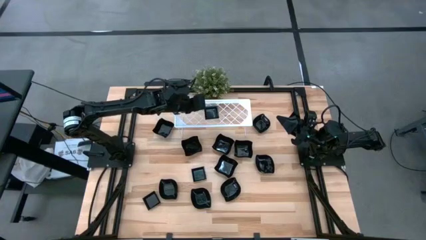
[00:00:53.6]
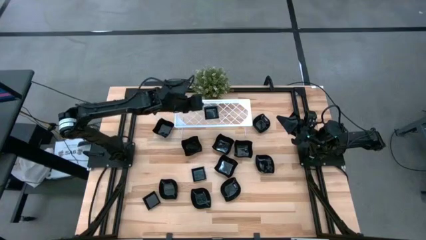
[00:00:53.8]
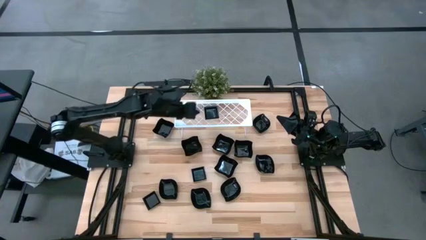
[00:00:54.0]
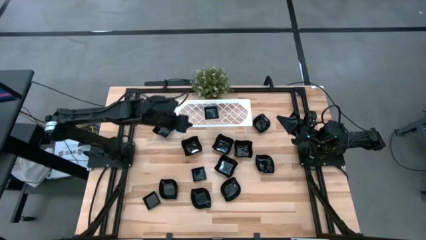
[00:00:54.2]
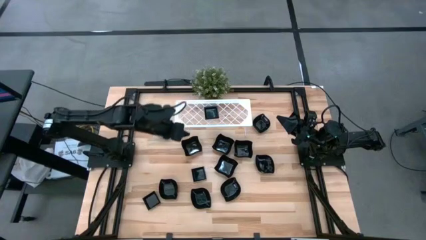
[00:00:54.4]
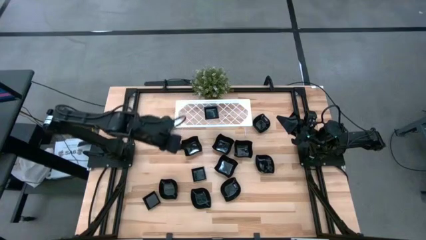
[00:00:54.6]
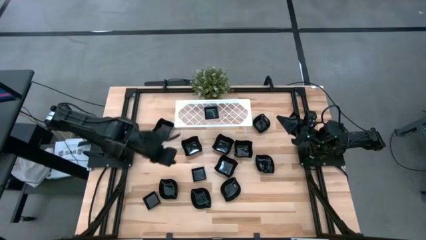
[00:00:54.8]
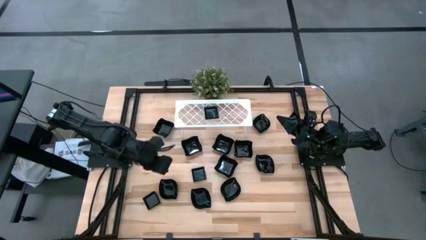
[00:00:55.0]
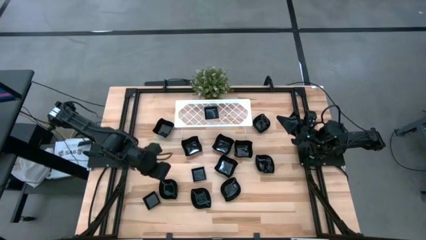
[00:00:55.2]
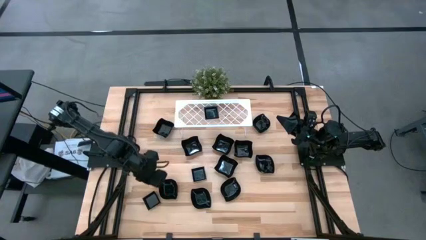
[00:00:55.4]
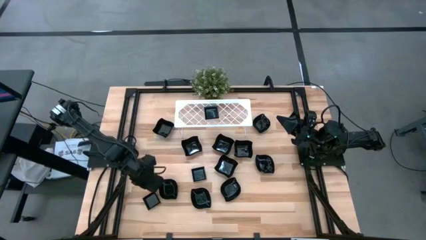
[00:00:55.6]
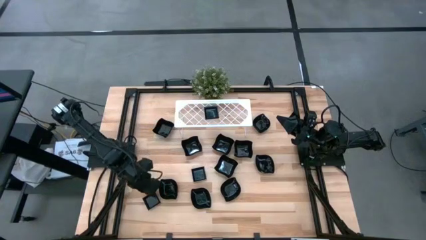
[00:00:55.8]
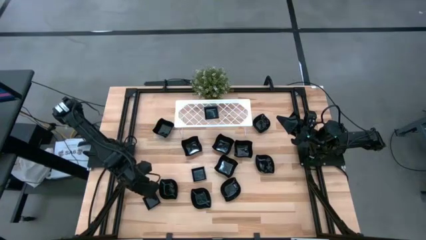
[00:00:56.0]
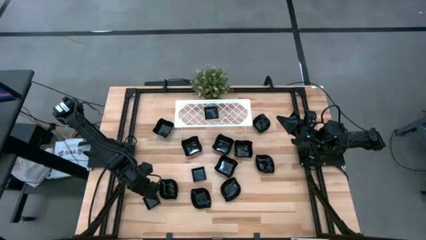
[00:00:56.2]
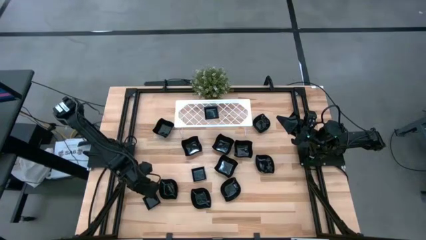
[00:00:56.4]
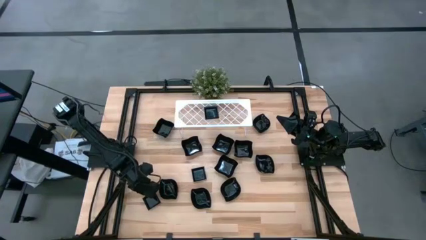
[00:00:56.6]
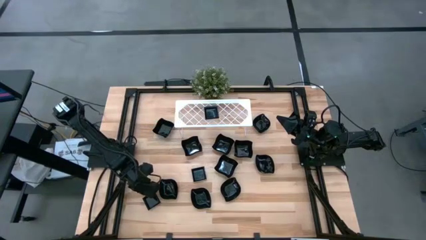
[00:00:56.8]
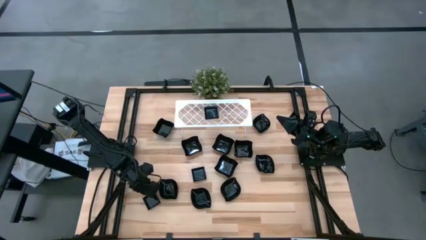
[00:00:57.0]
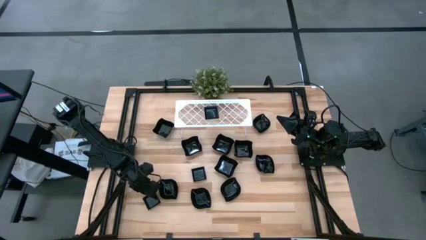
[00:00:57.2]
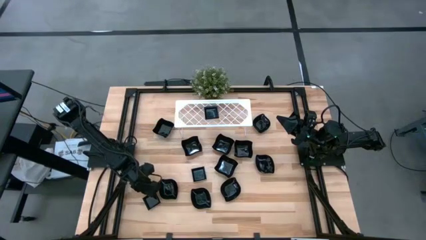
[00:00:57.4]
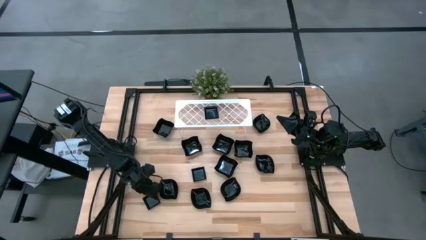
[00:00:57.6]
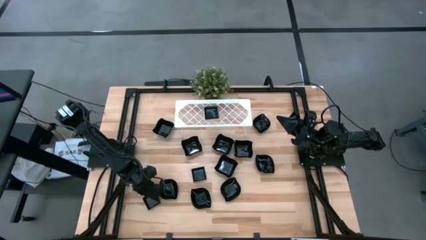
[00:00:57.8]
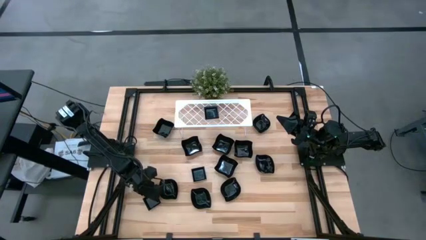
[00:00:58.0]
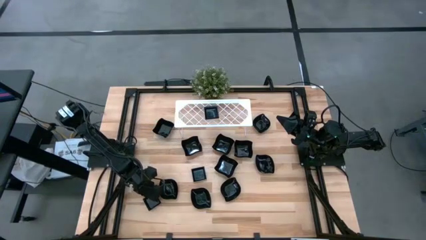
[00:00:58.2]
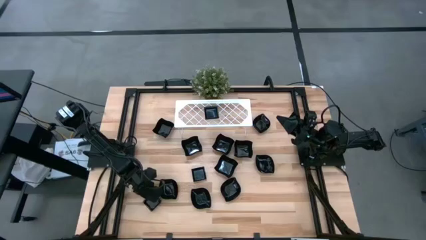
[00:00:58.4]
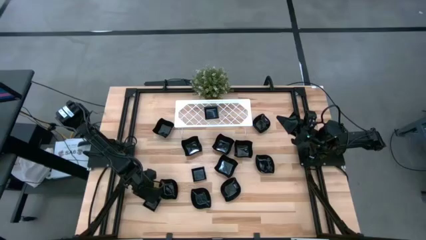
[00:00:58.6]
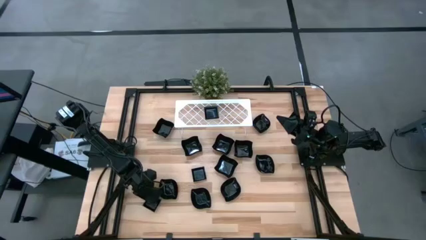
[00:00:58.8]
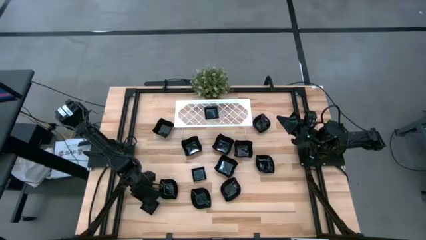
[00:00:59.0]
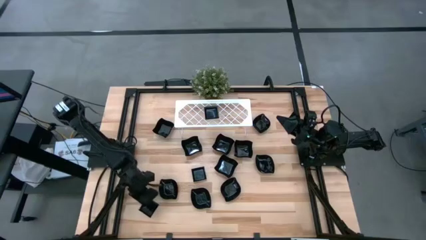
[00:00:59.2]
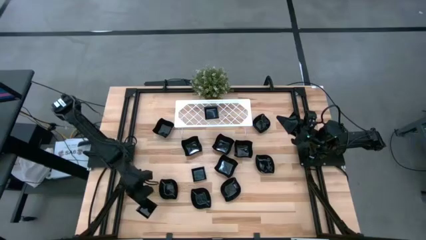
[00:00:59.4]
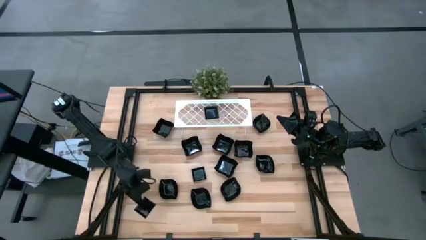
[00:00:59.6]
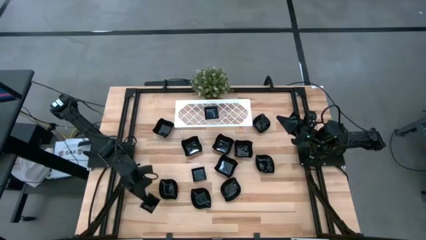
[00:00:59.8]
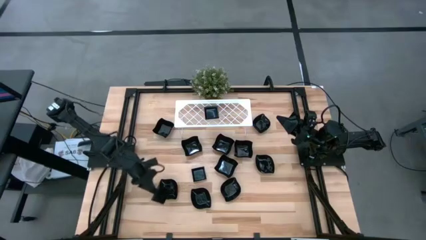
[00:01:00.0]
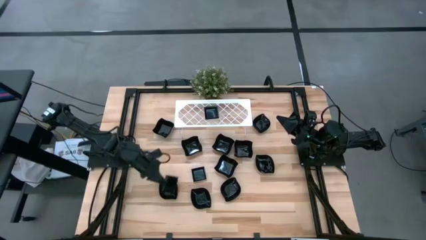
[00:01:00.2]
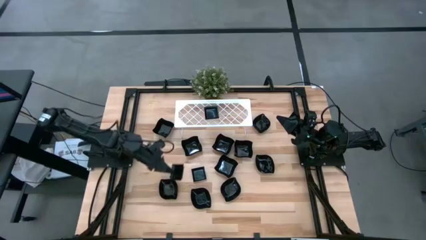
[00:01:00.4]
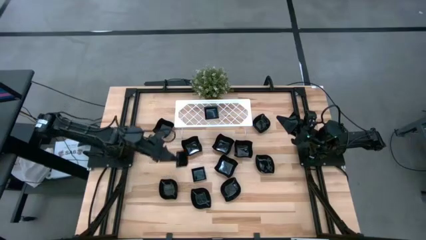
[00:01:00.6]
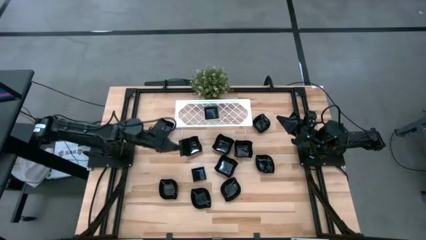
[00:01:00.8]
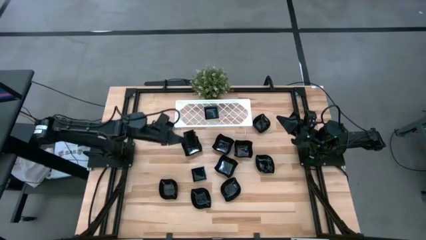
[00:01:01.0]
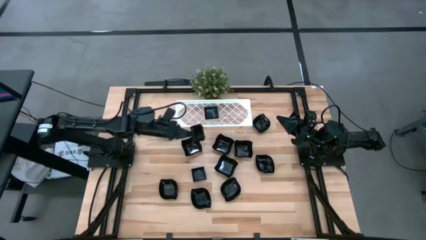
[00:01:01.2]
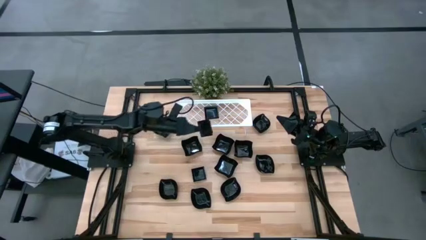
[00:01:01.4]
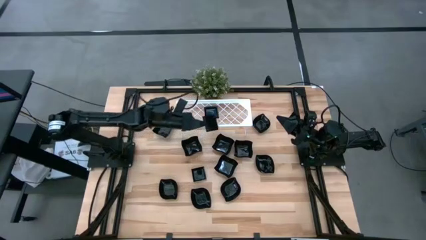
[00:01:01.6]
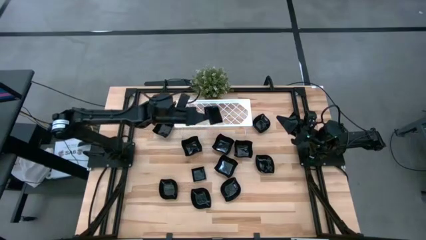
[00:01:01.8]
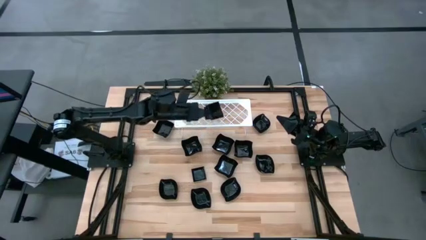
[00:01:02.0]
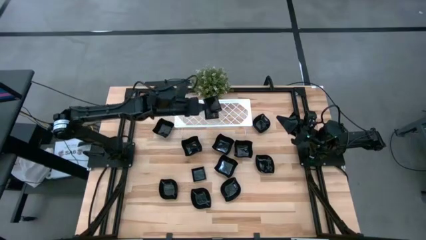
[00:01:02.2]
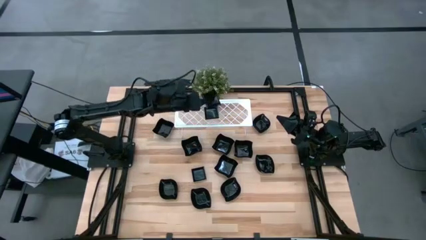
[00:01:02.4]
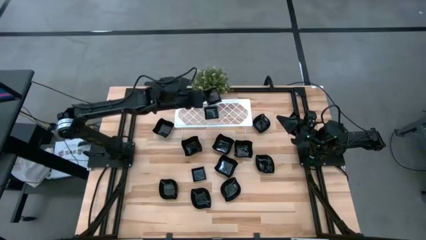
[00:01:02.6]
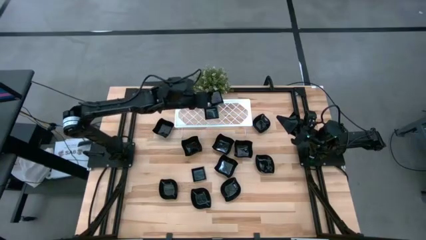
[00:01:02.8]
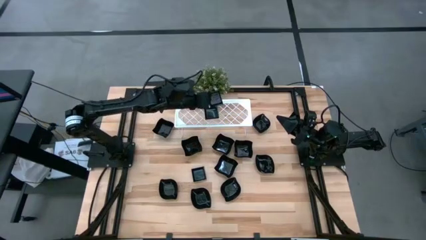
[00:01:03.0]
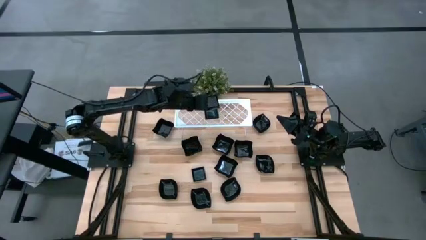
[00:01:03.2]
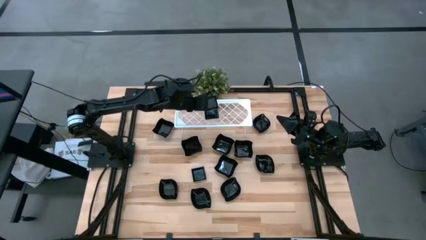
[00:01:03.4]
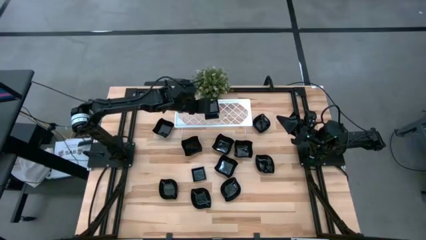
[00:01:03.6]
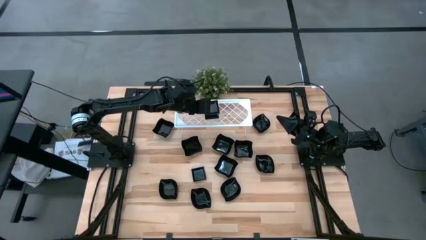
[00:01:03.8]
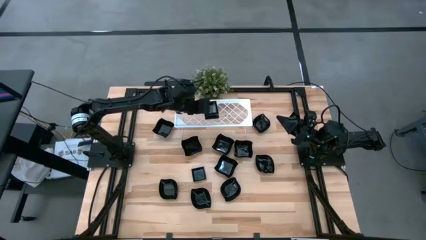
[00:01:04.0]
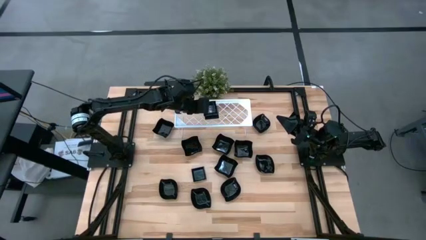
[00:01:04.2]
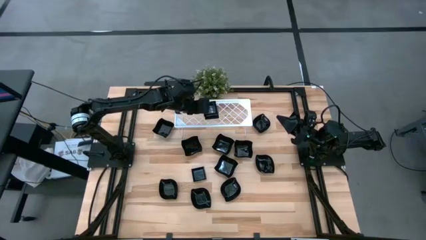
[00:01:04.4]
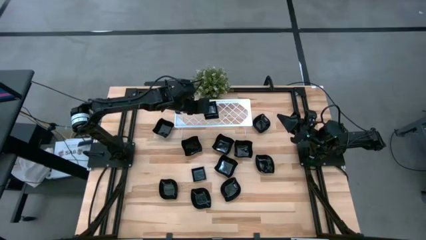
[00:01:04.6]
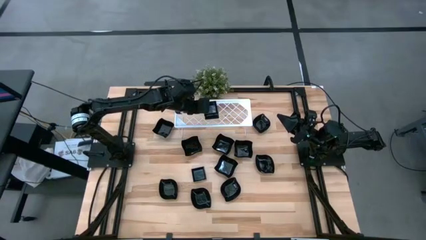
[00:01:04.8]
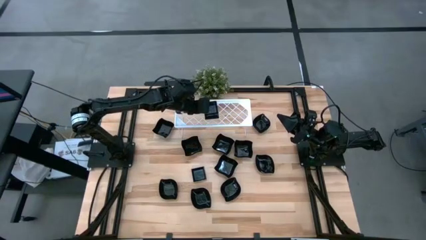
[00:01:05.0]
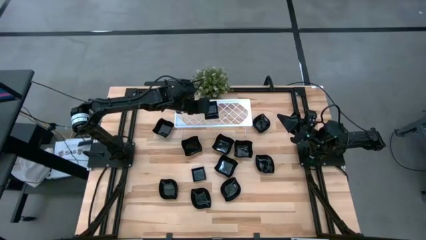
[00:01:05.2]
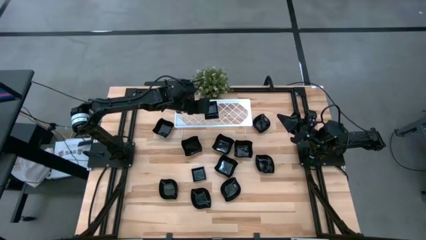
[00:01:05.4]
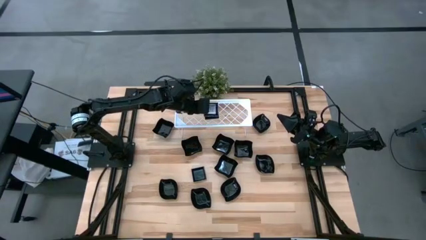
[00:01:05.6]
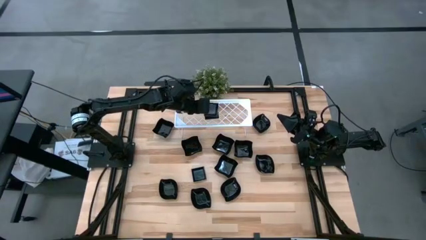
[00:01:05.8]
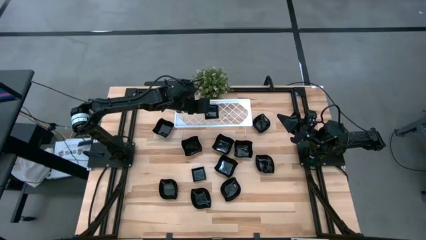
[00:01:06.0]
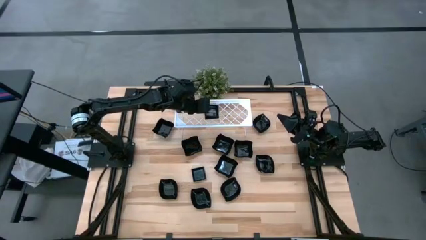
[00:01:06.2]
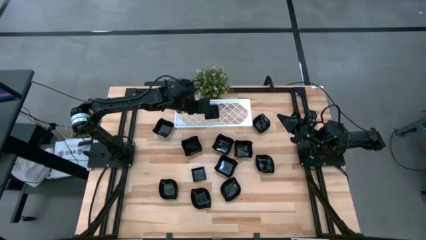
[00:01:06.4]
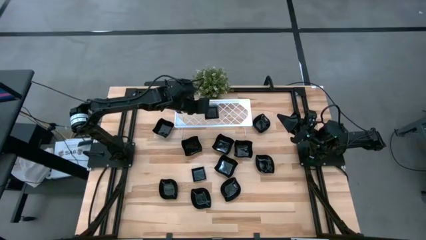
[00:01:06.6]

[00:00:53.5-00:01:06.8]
Task: Pick & Place Mini shaped plates
Stack the left square plate on top of the stacked square plate on the shelf
